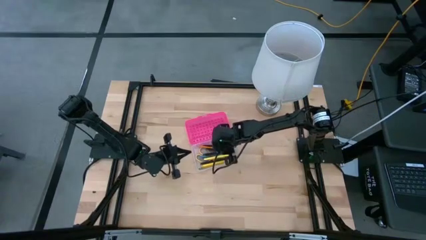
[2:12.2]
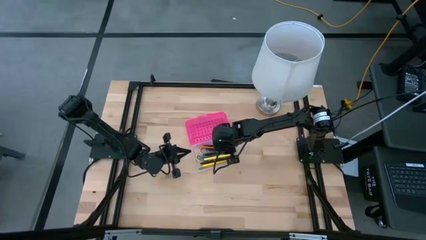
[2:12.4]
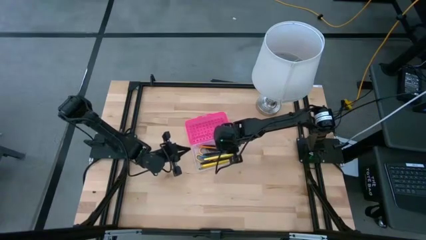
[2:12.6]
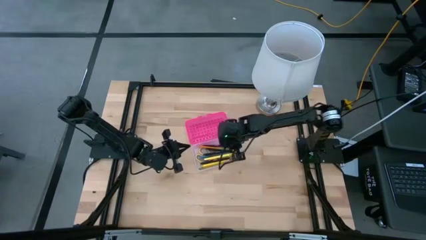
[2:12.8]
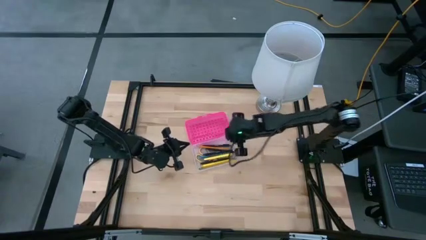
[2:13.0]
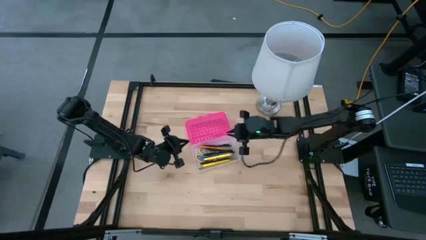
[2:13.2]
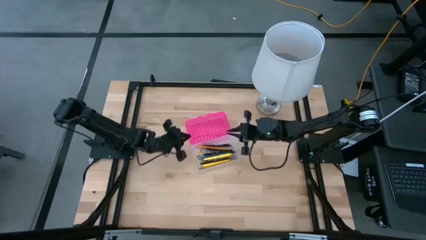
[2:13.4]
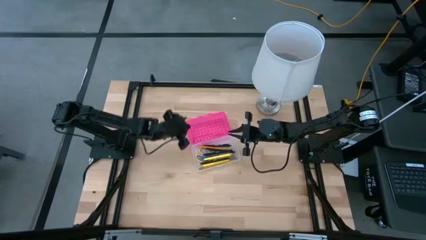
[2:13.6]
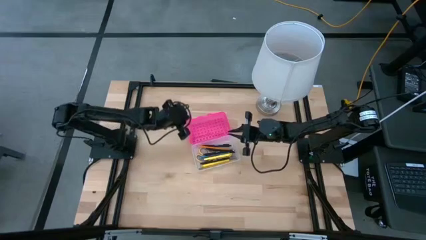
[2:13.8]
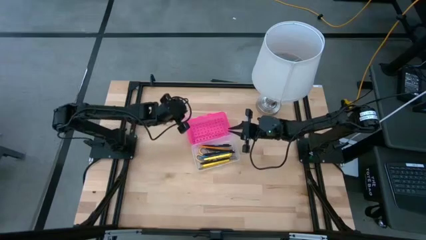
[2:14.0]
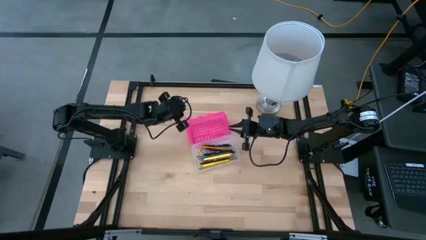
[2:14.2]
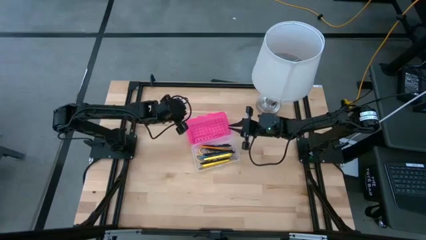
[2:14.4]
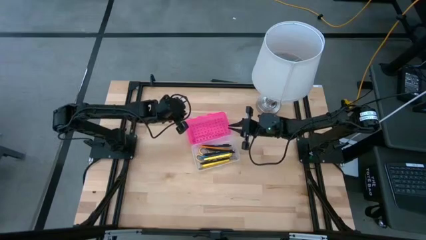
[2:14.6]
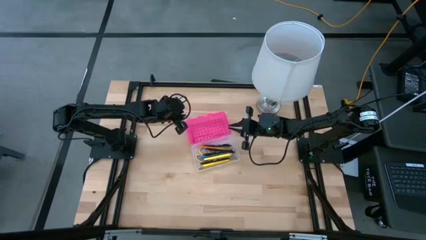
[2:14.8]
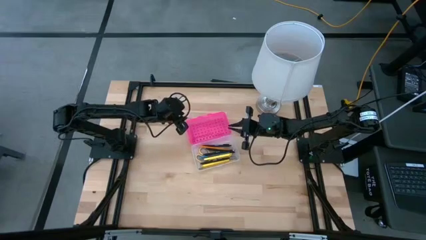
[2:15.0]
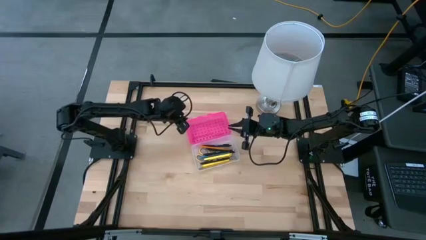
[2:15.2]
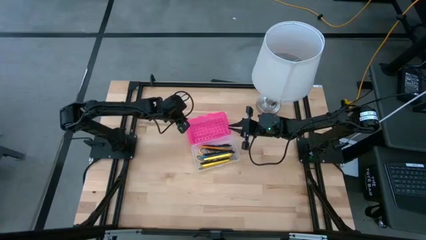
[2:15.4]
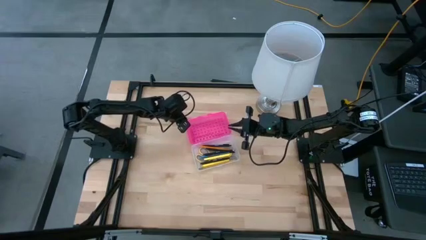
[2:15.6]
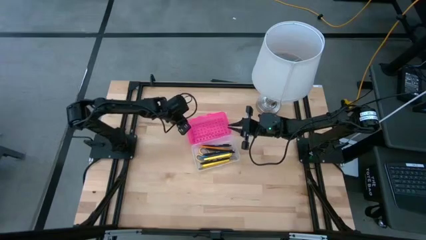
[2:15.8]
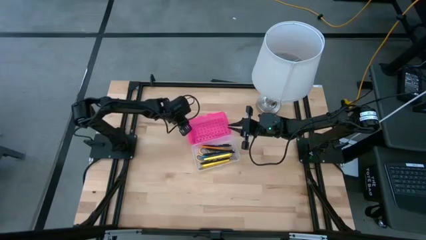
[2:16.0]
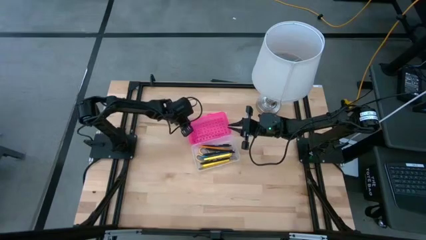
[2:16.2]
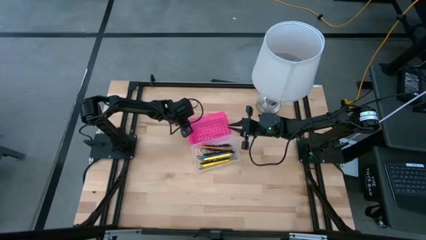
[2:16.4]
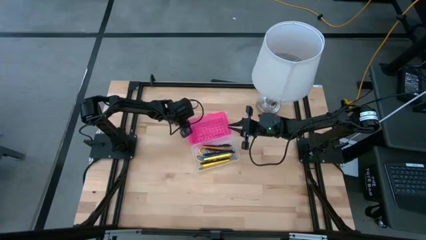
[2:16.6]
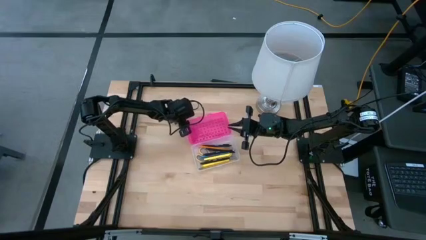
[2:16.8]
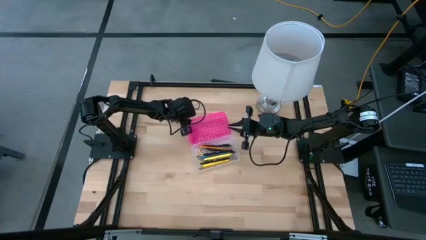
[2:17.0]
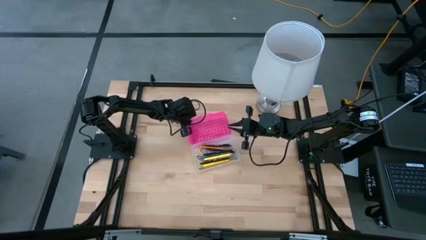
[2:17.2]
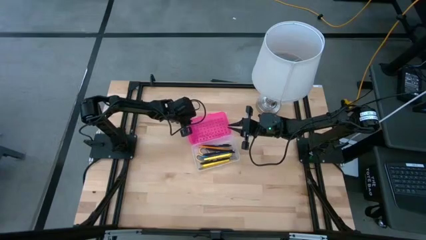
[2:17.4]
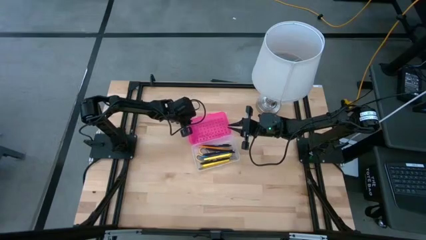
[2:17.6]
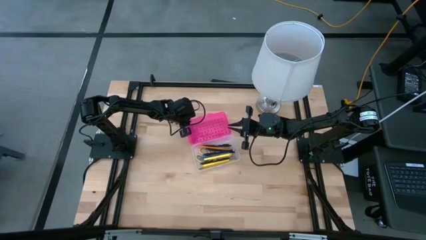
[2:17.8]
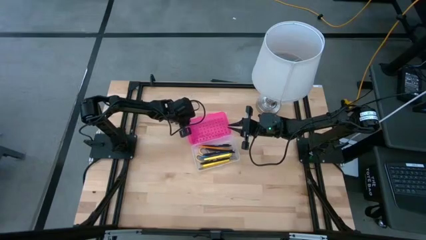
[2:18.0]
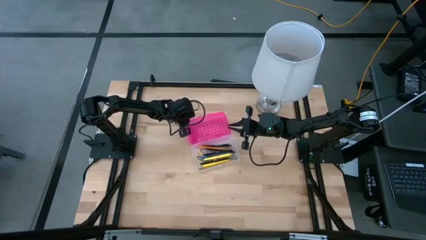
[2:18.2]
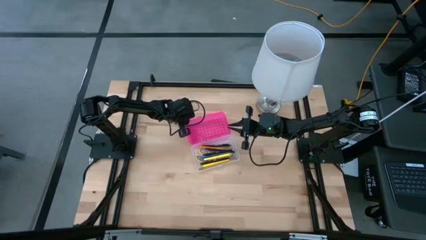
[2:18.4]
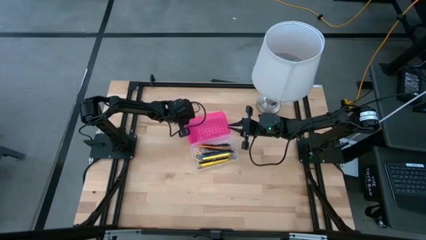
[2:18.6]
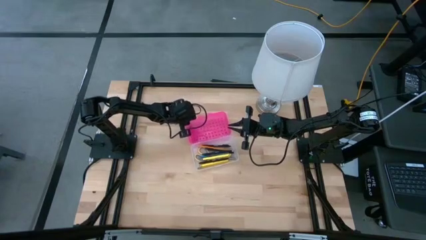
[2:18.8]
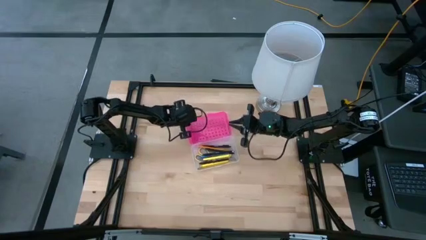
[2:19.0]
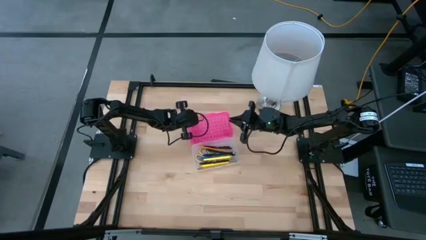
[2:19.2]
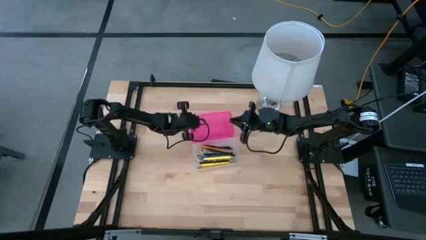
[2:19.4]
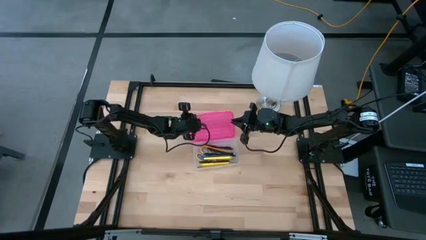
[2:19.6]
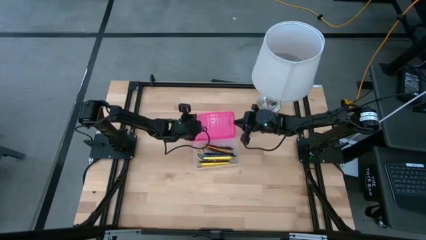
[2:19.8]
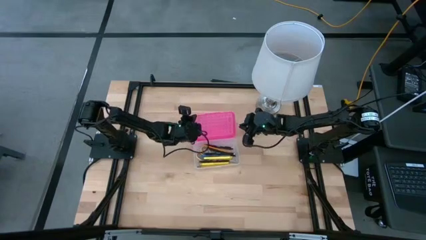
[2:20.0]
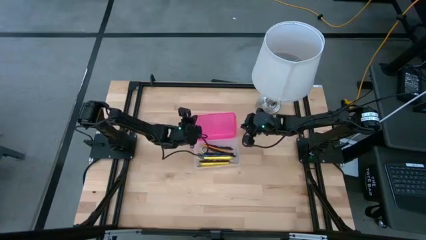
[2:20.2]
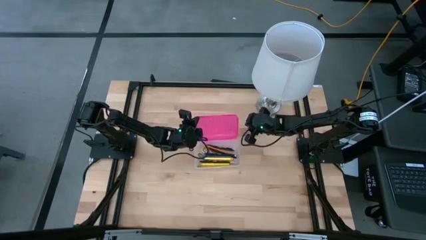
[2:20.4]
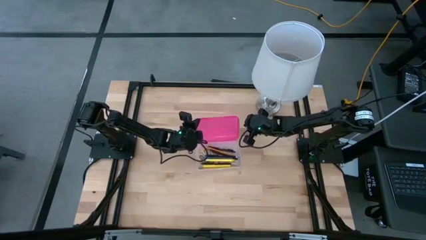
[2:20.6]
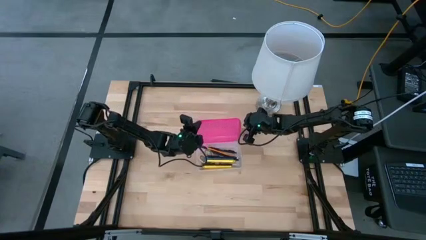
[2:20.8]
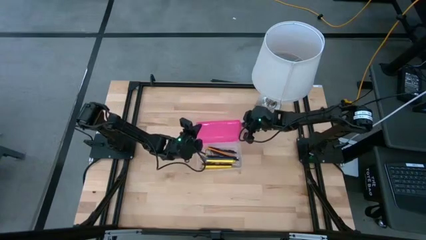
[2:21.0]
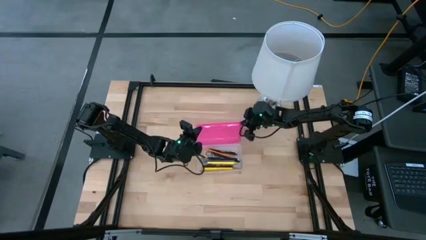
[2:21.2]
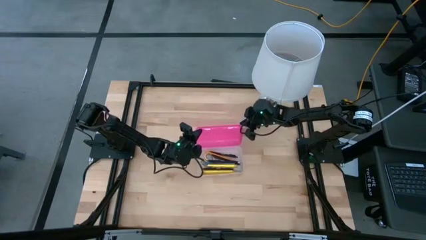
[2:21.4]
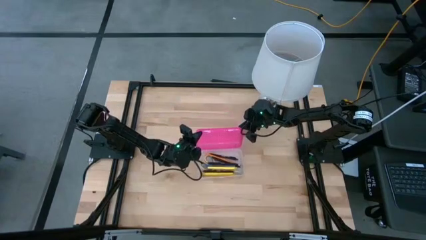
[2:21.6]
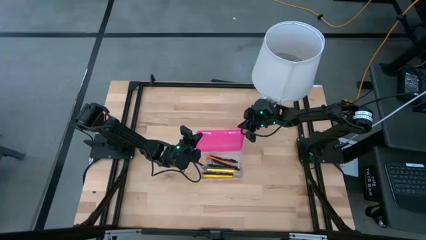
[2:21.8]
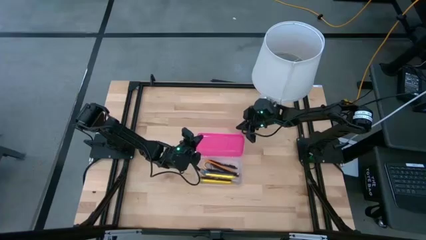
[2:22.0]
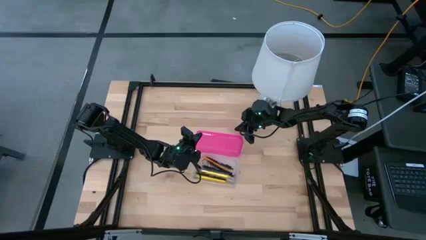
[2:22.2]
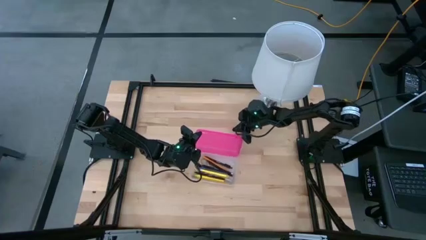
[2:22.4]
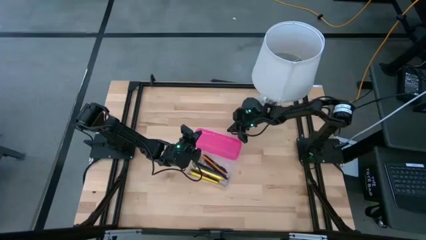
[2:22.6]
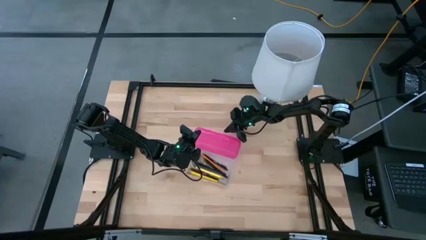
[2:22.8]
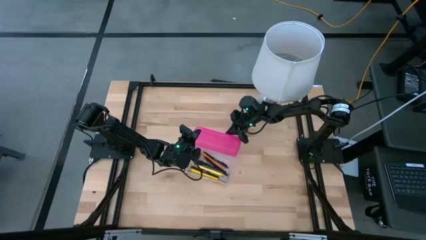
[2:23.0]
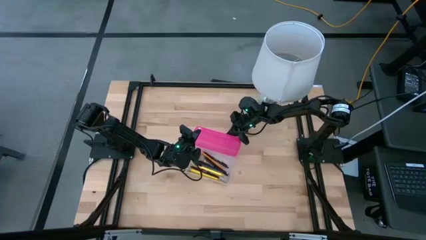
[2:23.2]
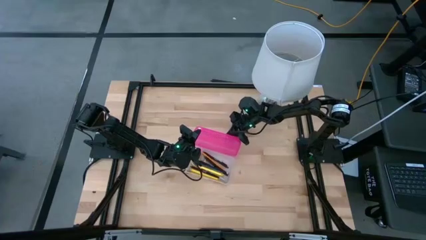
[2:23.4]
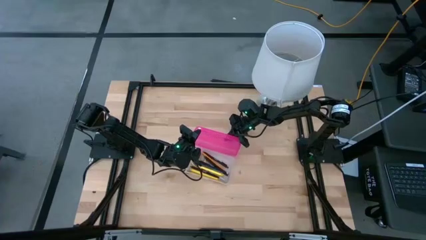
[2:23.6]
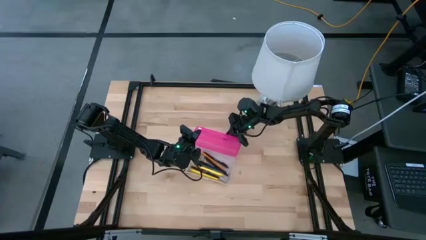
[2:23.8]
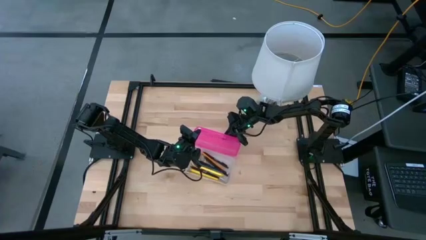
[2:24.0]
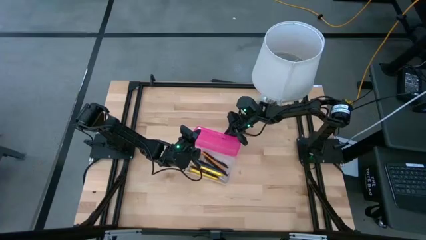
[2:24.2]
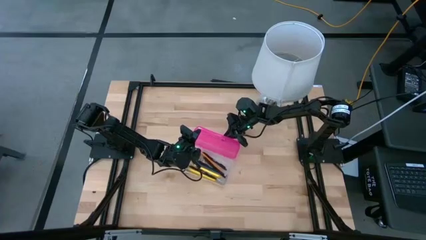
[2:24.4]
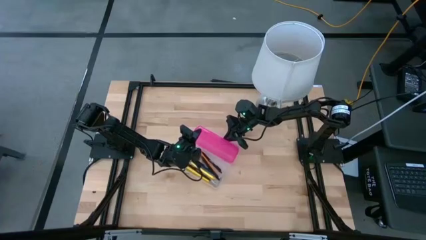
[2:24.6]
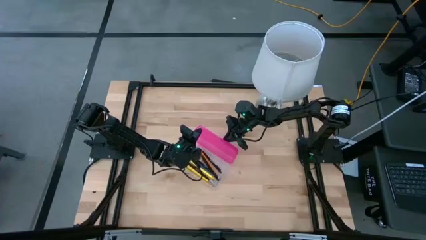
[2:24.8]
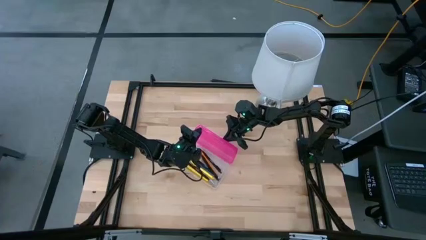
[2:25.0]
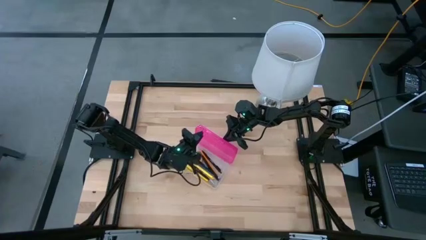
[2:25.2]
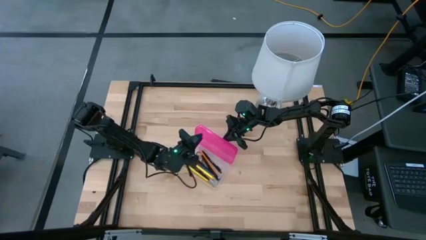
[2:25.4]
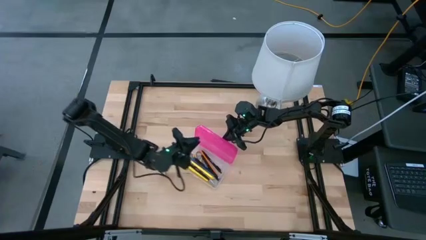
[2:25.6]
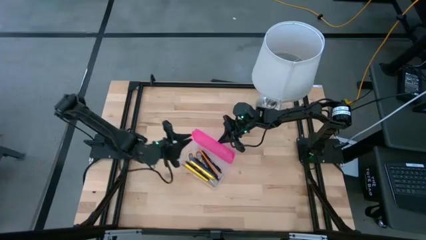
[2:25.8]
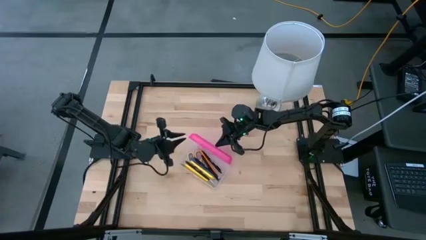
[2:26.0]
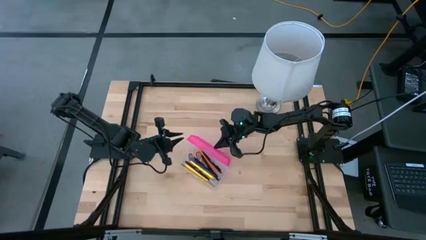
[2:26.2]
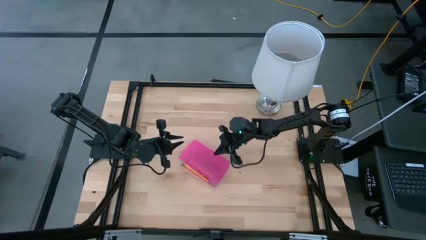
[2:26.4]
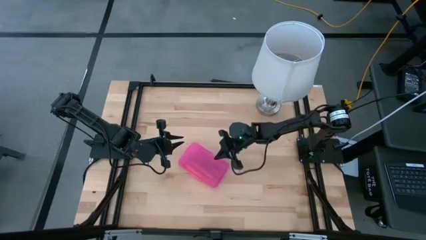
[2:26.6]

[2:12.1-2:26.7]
Task: Pick & place school supplies into a supply box
Close the pink supply box
